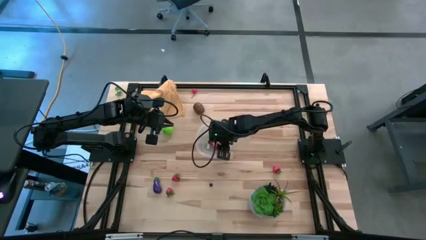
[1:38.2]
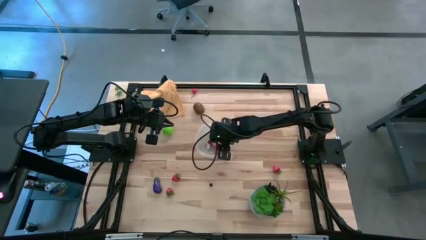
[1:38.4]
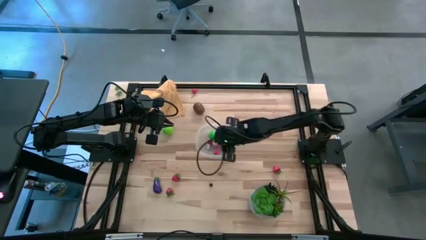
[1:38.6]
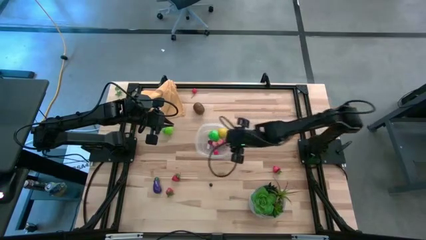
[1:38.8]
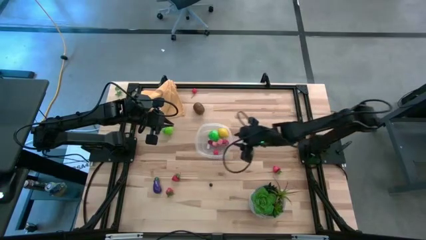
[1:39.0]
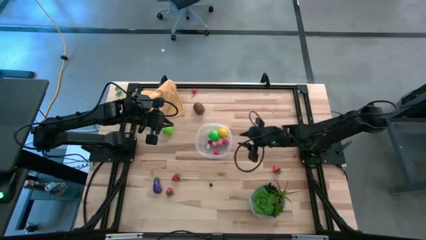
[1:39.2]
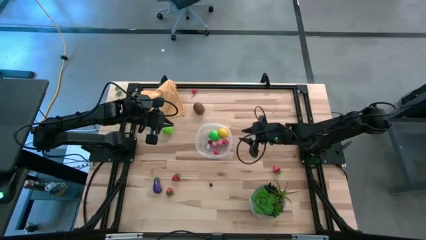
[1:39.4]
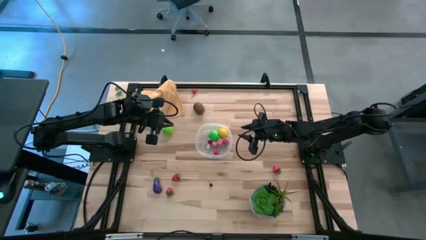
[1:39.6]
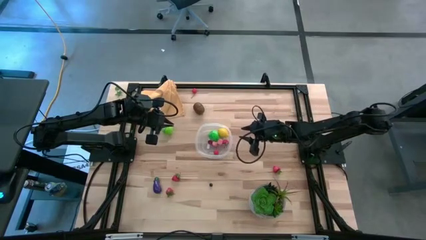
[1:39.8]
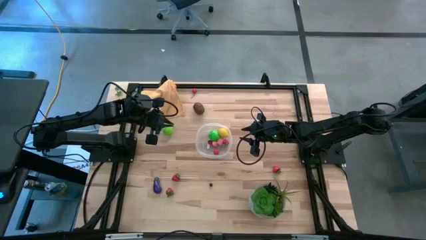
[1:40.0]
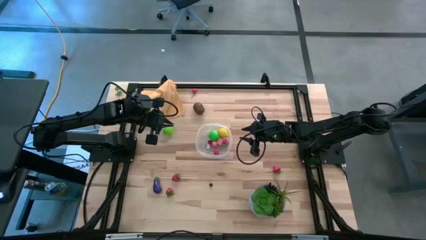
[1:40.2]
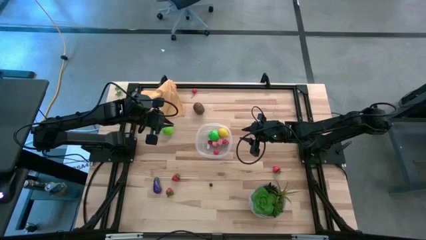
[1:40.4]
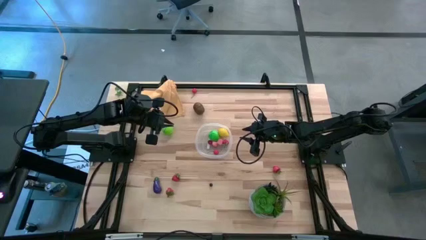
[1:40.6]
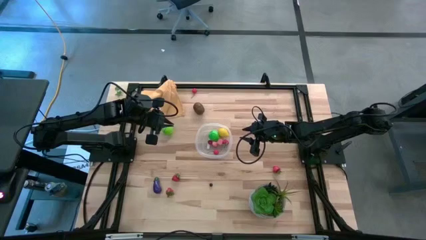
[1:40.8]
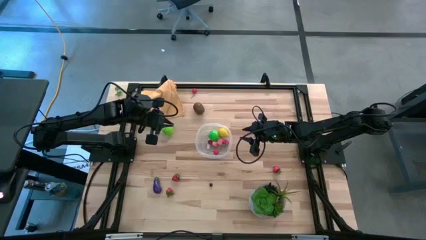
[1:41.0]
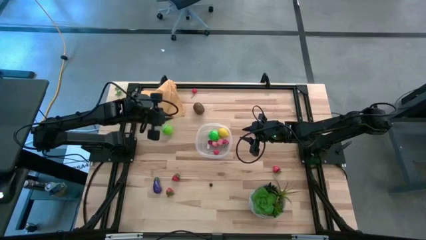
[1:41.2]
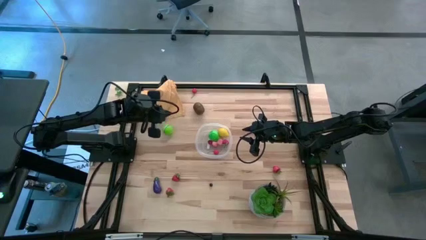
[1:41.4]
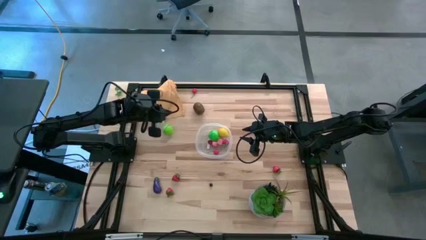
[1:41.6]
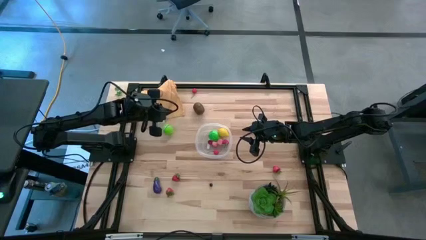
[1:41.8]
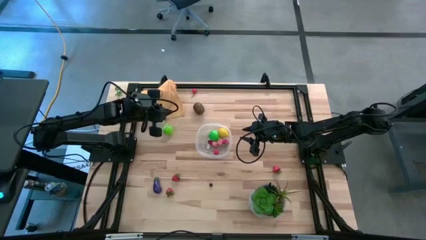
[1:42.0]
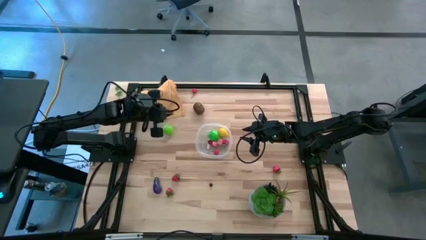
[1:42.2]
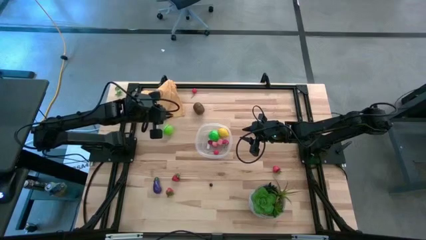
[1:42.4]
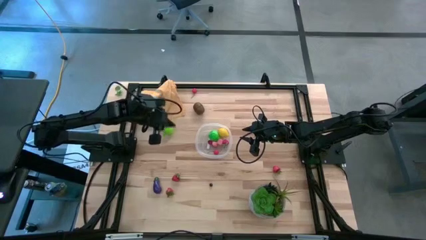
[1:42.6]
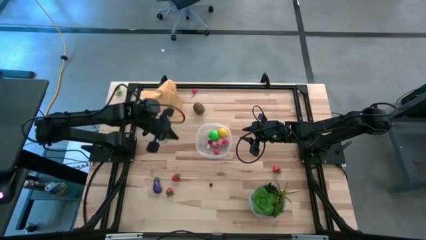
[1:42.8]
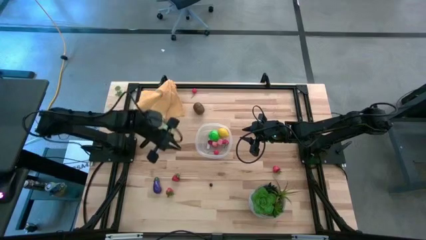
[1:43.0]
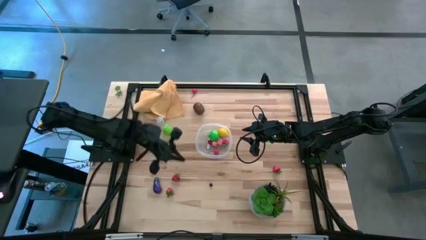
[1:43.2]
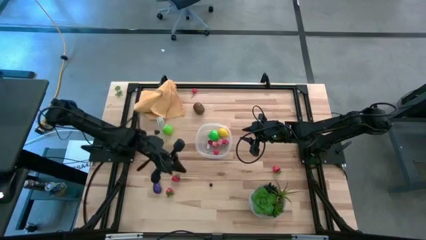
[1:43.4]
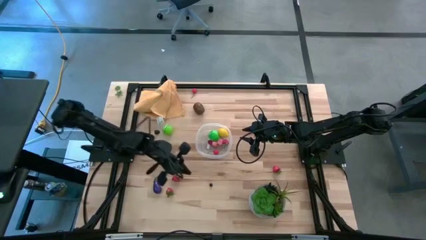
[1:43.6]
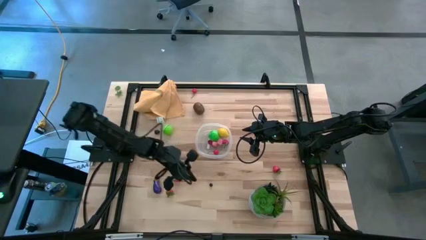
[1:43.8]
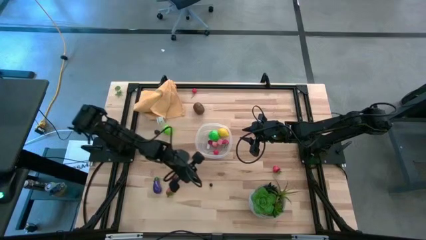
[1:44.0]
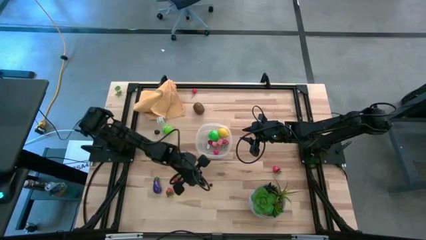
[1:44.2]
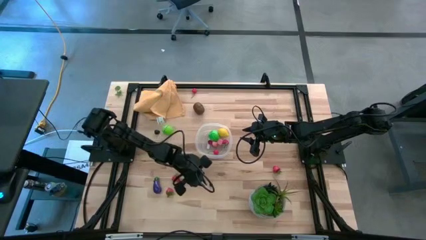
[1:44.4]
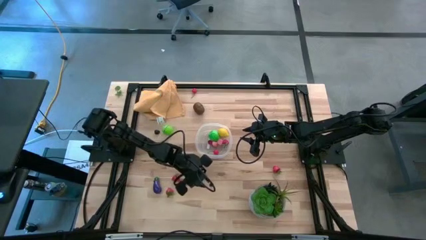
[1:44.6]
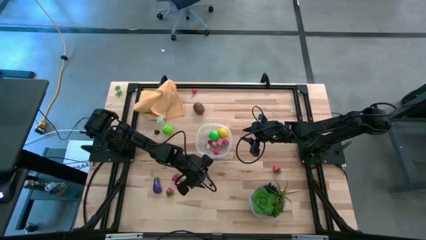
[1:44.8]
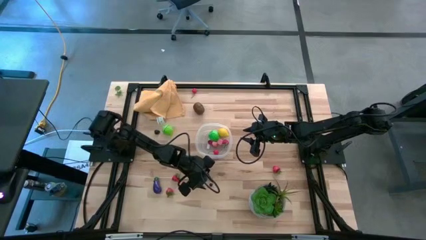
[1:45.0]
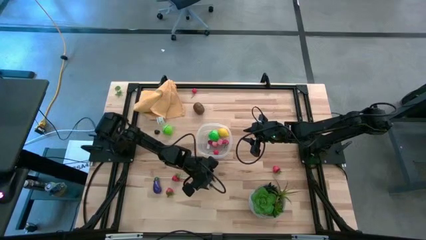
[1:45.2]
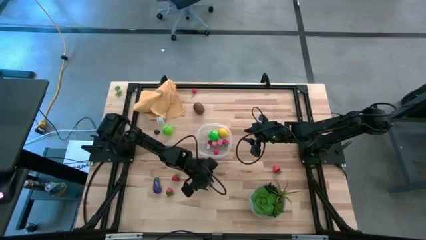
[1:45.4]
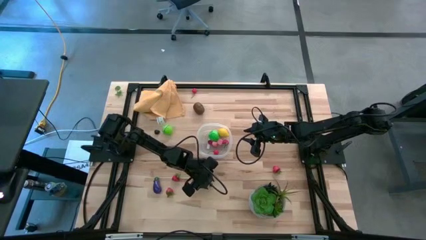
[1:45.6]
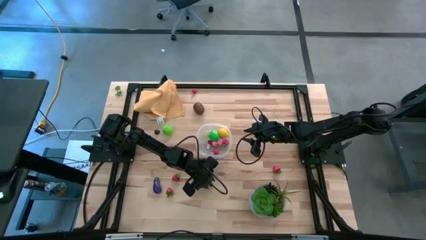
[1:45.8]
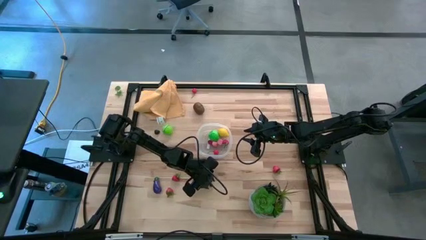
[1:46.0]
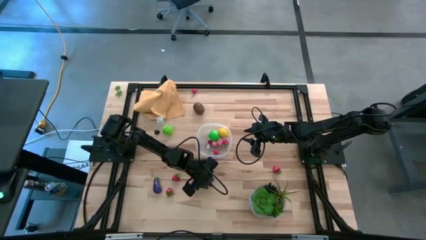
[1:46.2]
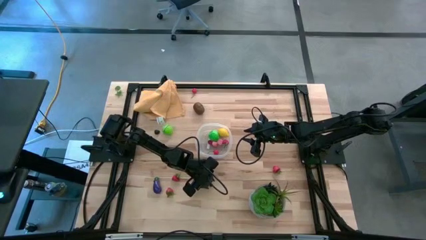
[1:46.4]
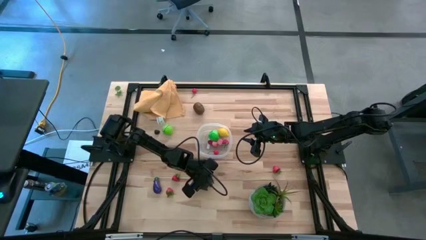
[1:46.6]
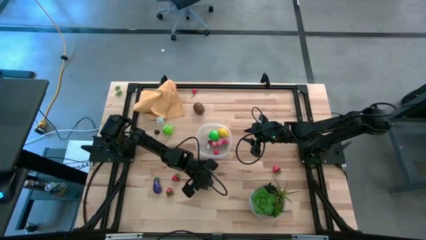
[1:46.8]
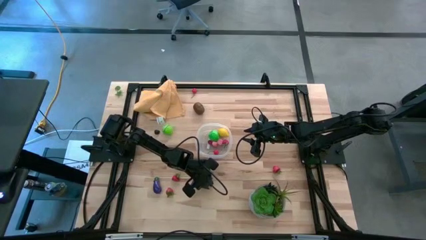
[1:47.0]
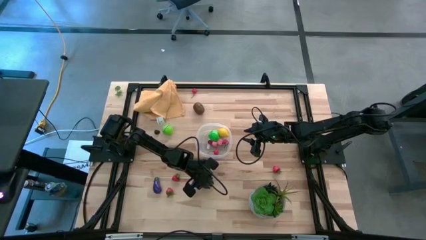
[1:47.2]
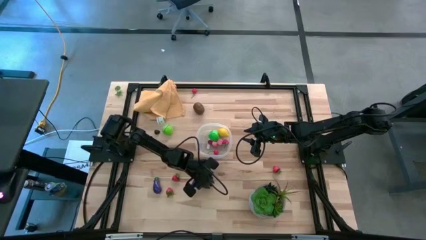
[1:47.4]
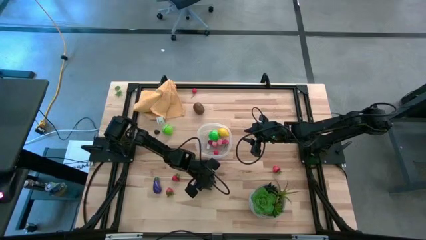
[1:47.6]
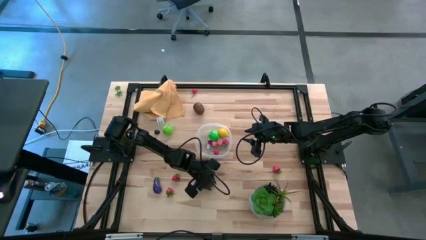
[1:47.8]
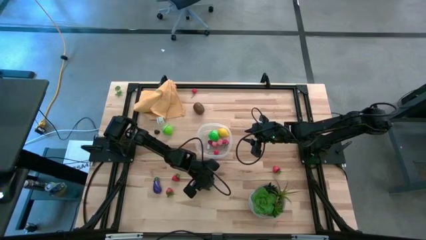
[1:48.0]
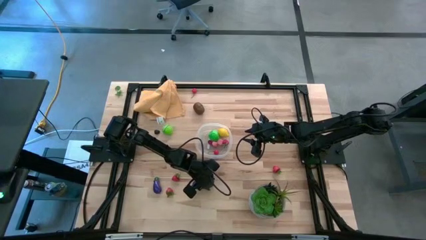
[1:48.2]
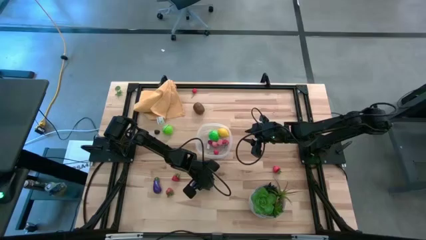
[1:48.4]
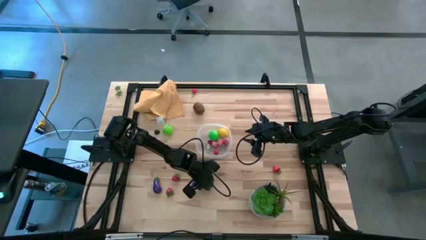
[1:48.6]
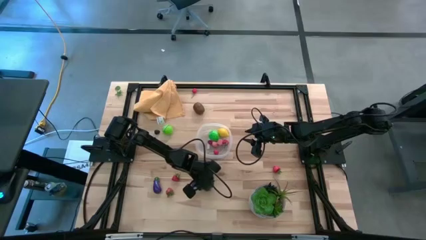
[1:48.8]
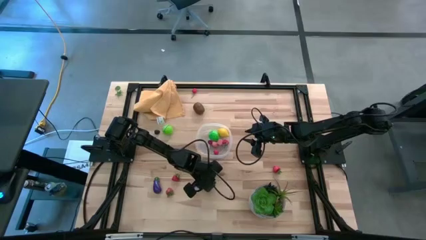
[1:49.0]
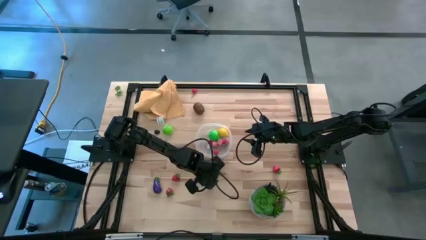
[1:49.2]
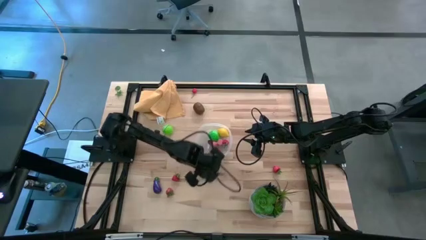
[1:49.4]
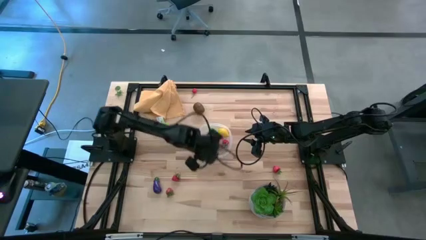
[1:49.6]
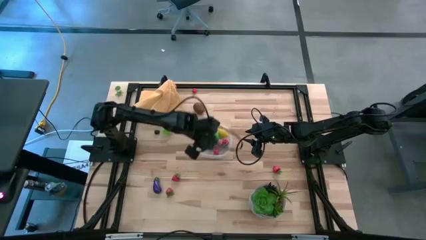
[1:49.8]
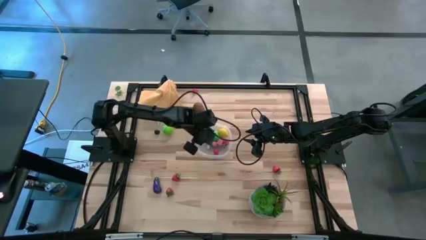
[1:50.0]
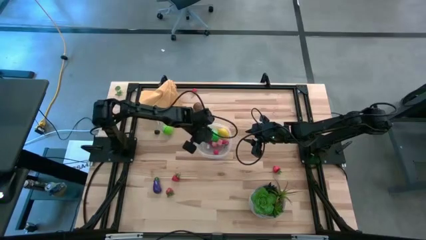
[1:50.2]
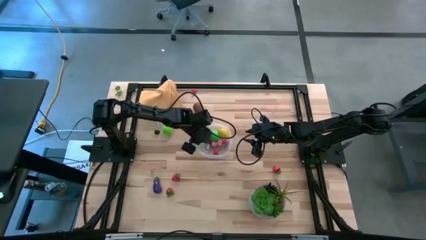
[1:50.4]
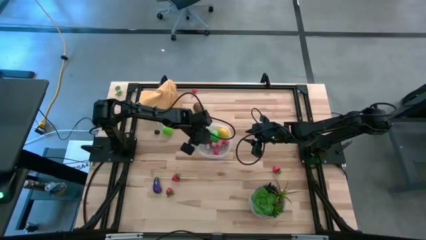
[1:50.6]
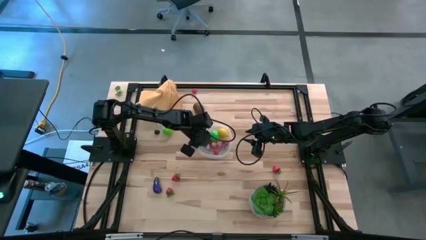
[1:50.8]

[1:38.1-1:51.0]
Task: Pick and placing Produce into tupperware
Put the blueberry into the transparent bin

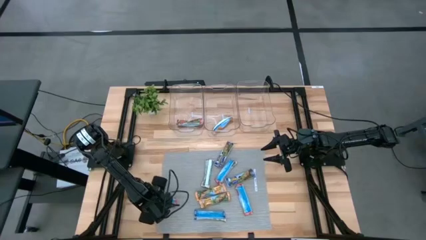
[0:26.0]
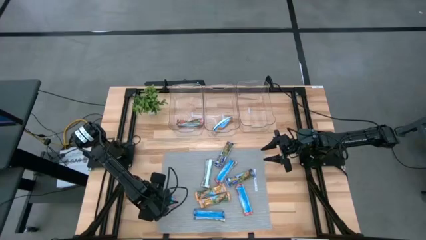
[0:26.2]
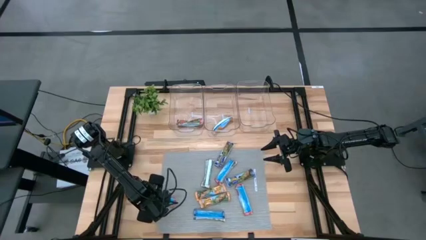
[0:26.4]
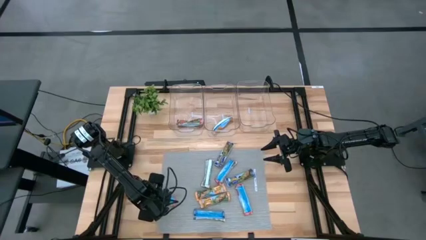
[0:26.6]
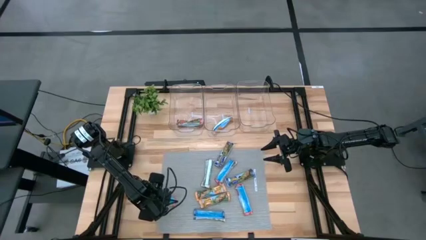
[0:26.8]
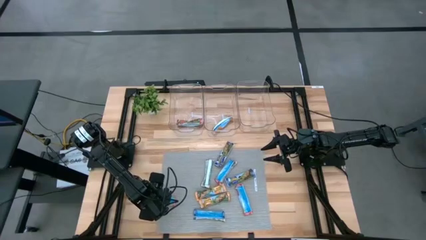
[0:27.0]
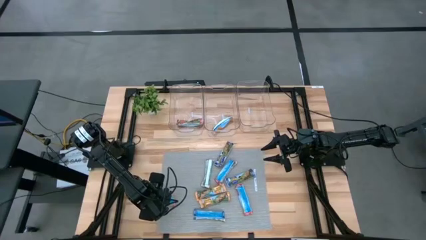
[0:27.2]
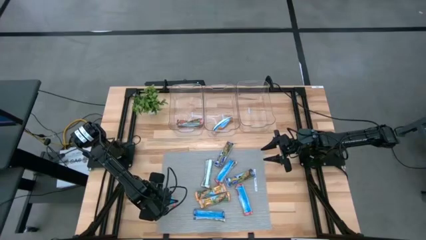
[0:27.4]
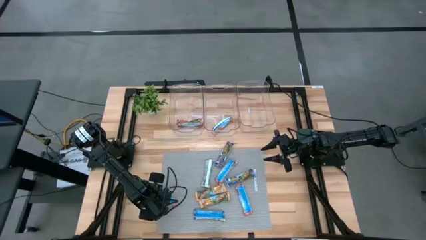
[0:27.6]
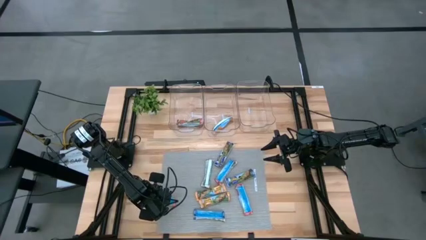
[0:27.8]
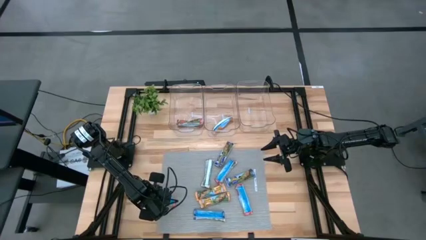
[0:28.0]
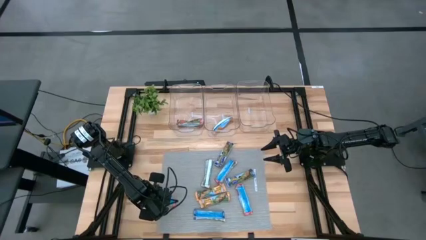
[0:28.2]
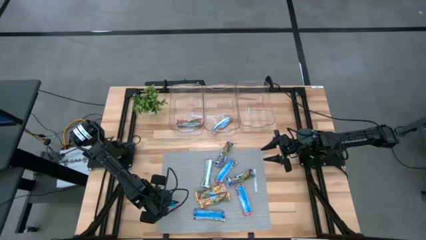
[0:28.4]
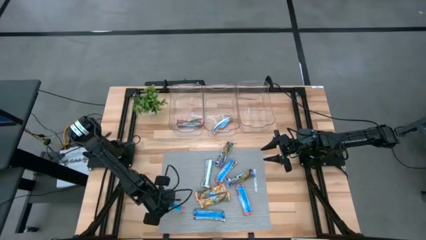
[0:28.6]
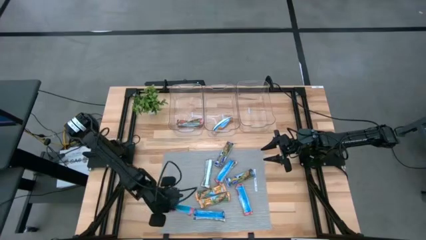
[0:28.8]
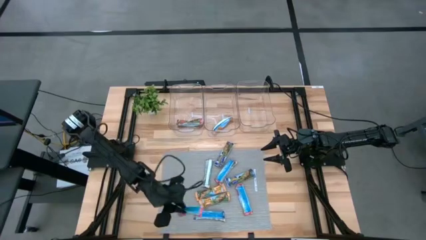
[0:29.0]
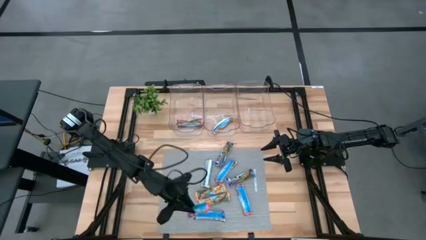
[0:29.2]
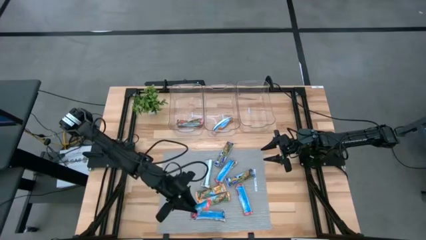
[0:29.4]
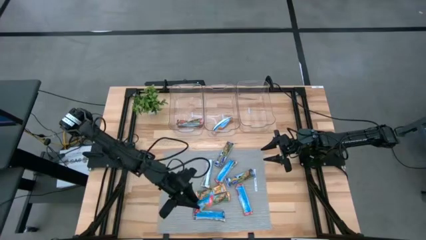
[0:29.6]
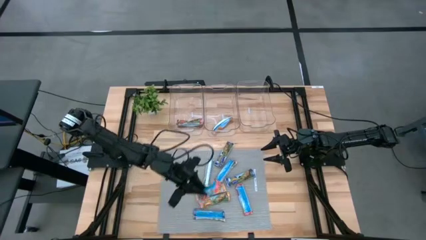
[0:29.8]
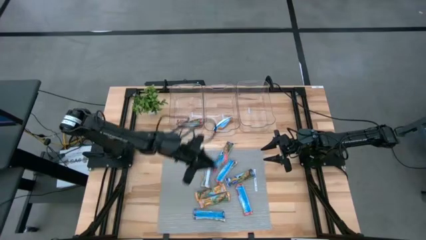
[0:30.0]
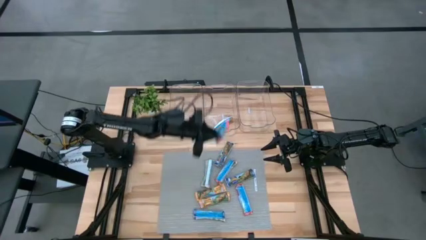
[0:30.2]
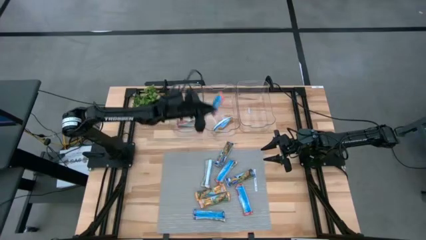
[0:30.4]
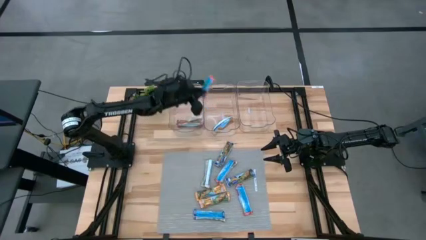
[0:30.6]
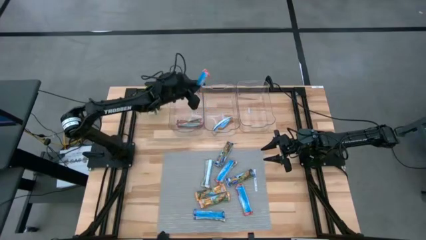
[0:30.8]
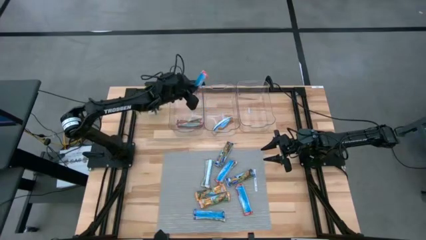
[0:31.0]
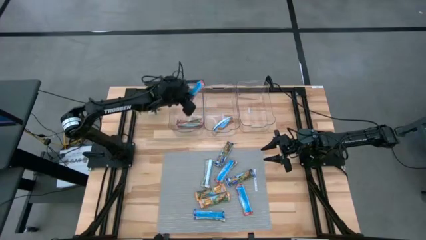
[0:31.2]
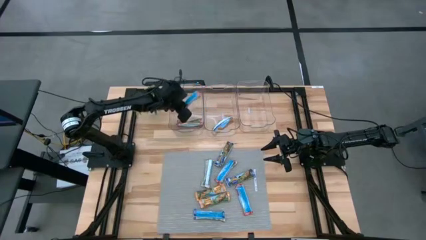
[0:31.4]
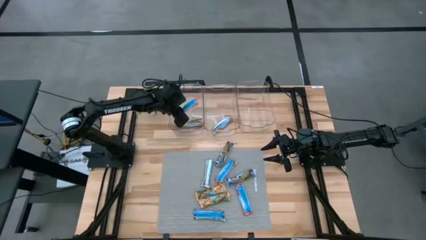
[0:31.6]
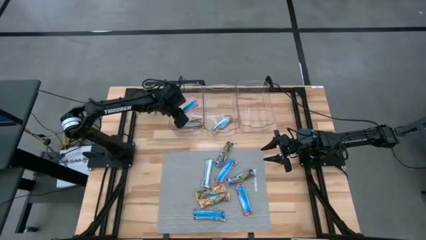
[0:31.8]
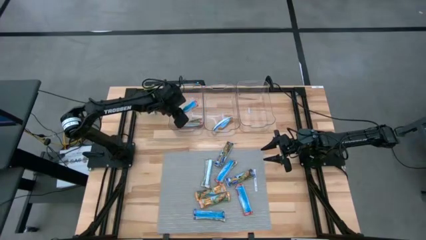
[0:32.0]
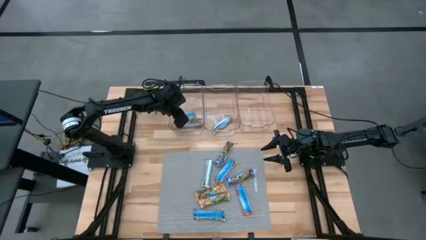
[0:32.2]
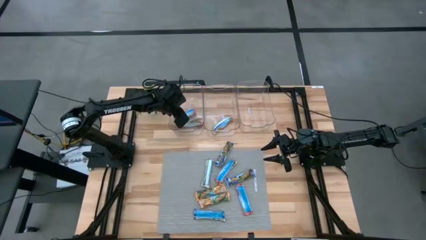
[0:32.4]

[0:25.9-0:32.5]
Task: Pick and place Granola Bars by type
Put the red granola bar into the left transparent bin
